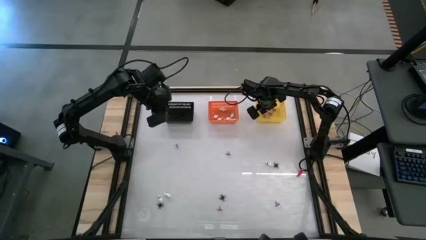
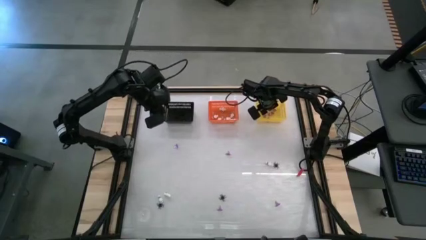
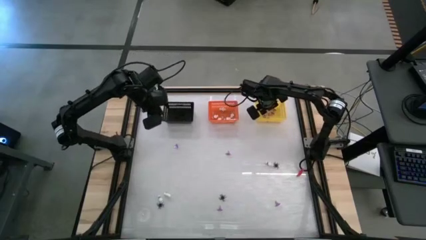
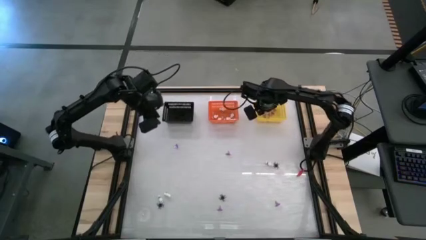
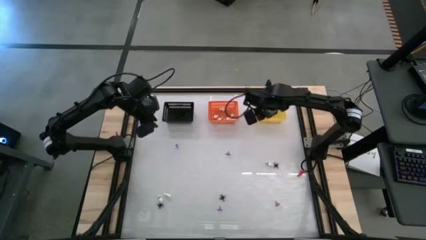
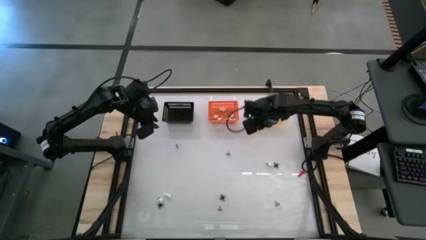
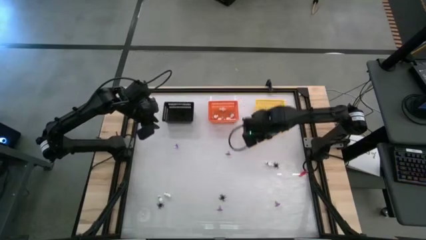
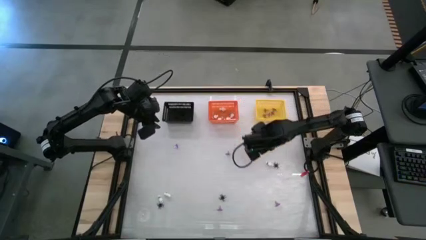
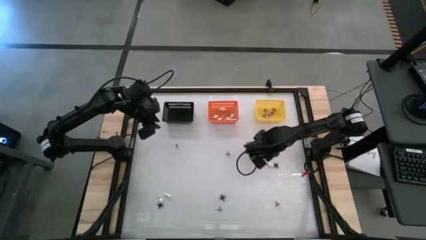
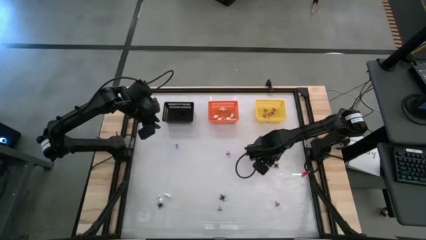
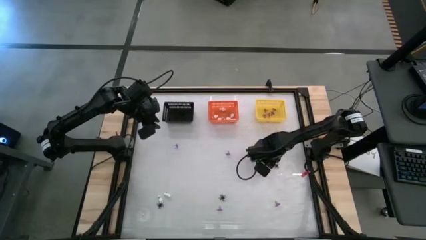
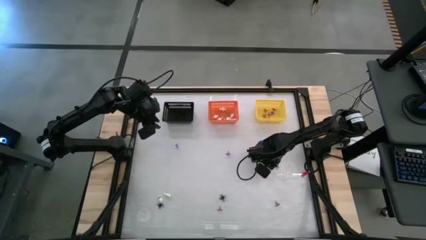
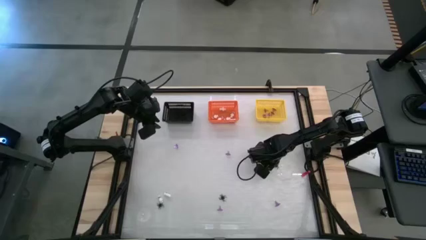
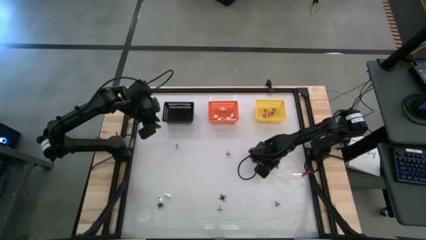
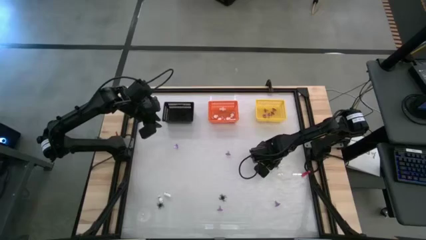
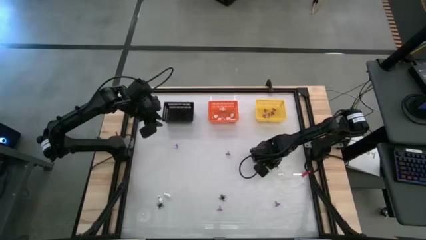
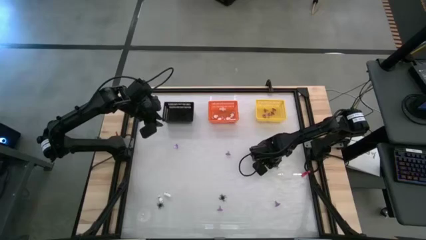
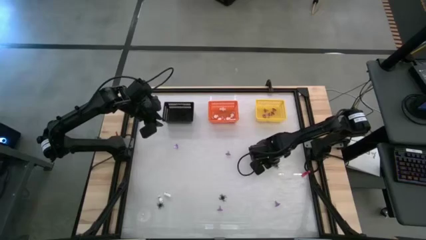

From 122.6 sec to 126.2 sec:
Task: Sort Halloween decoration
Put the skeleton toy into the orange bin

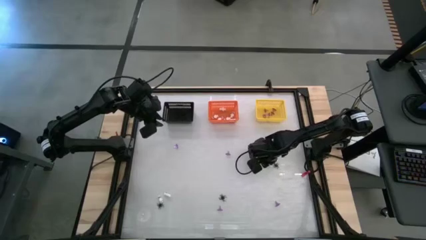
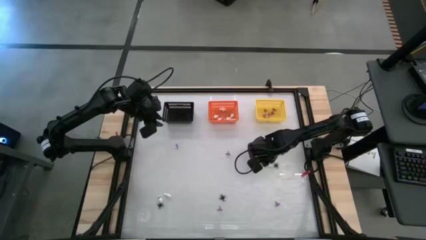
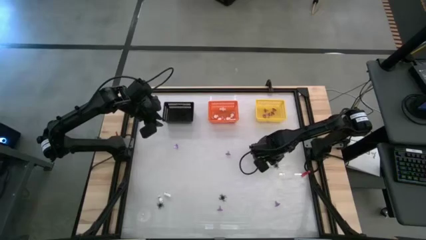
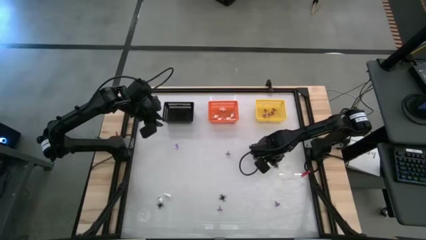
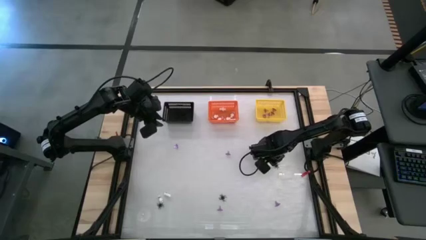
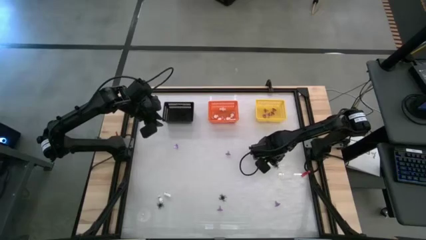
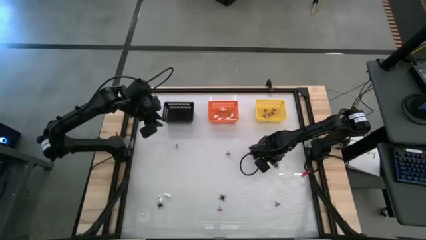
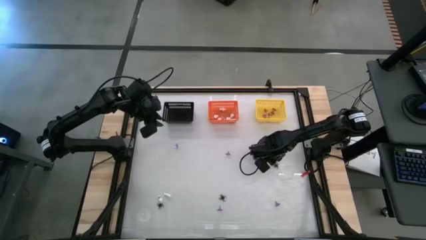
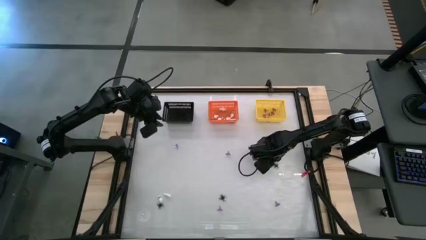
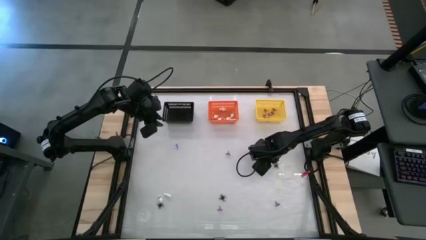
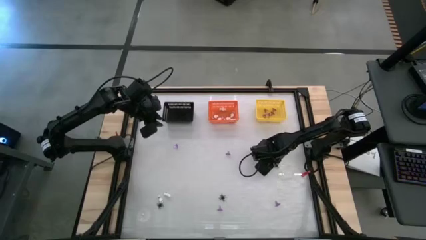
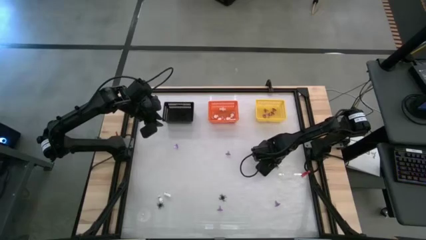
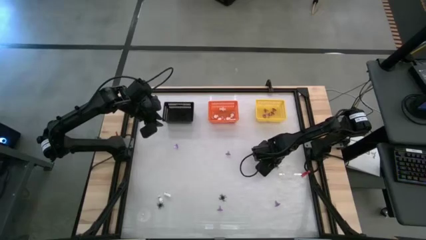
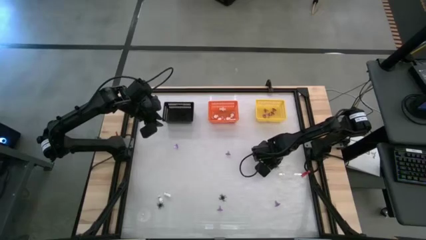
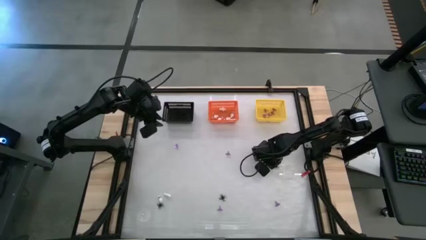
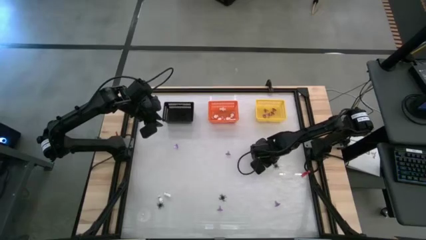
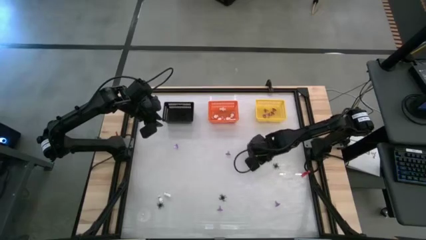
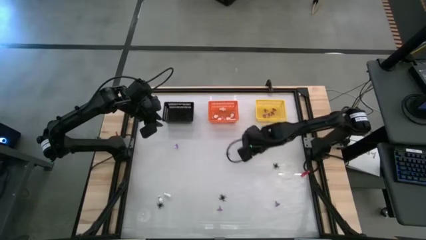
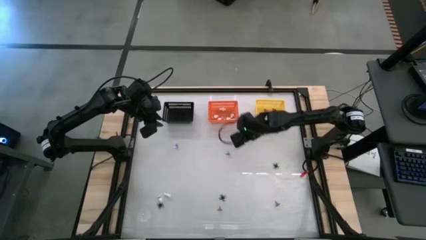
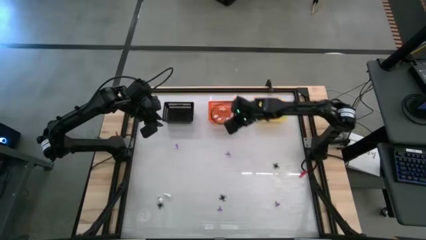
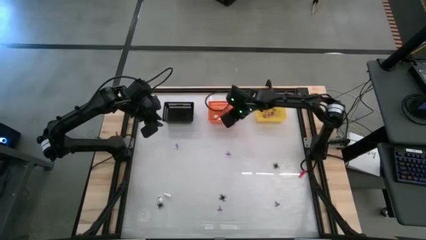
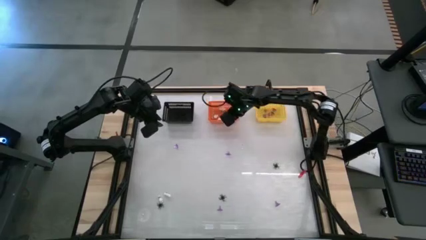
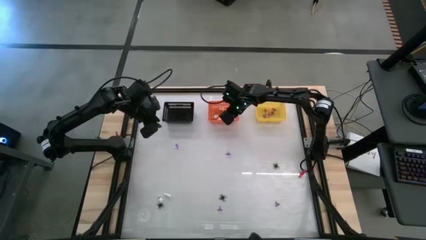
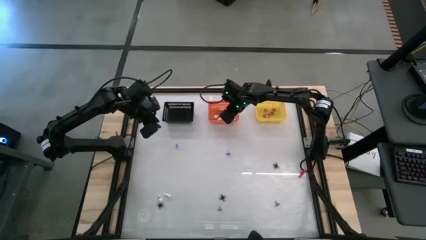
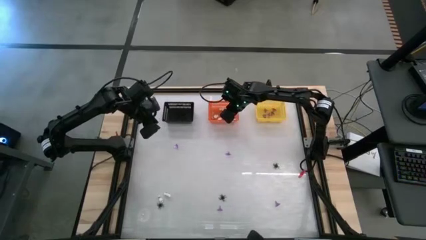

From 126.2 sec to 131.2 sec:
Put the top skeleton toy into the orange bin

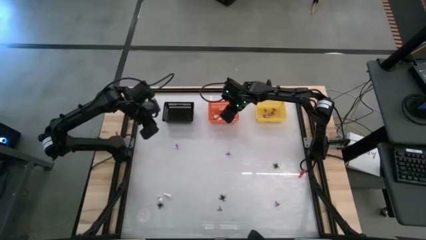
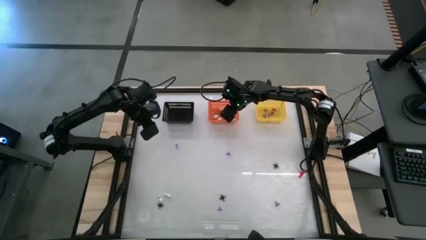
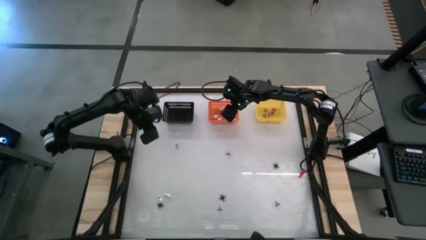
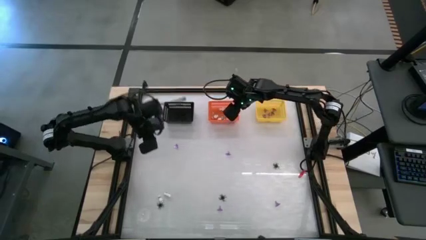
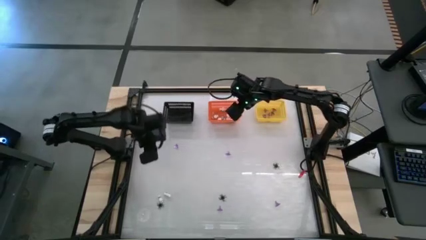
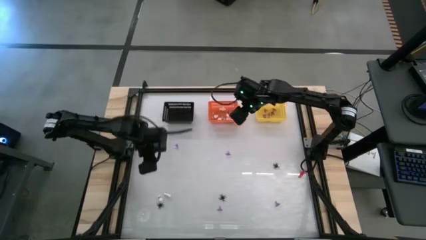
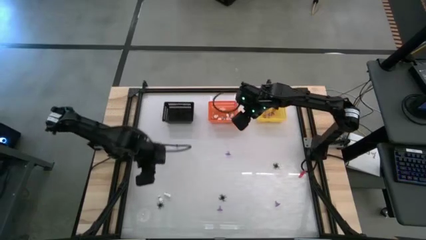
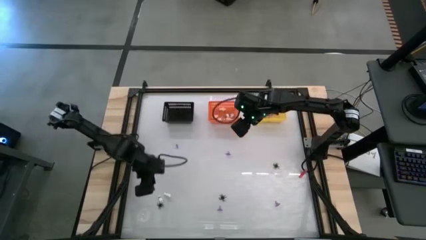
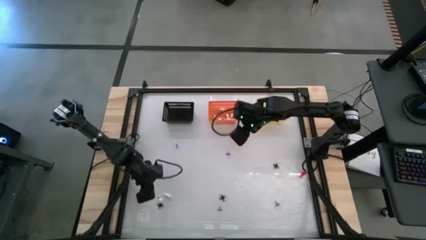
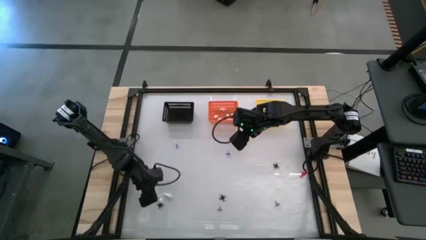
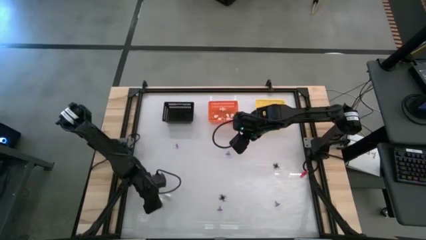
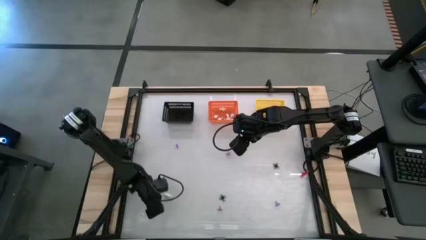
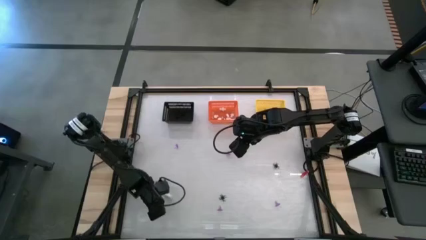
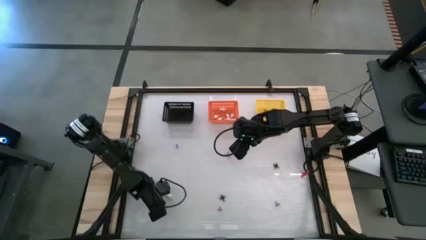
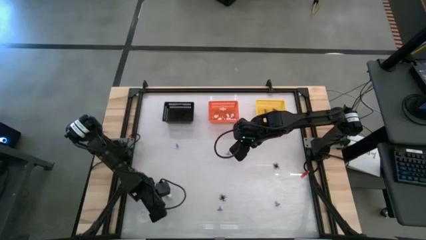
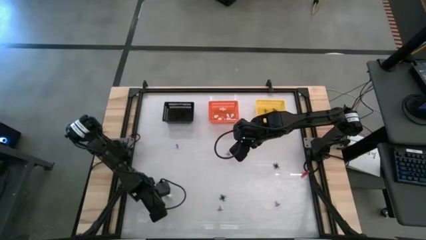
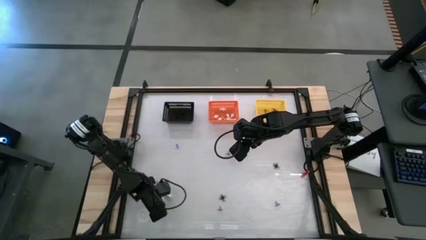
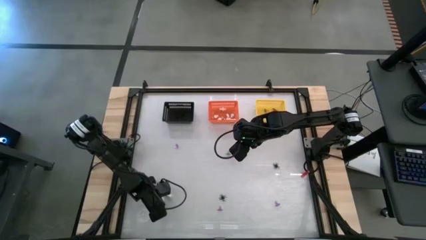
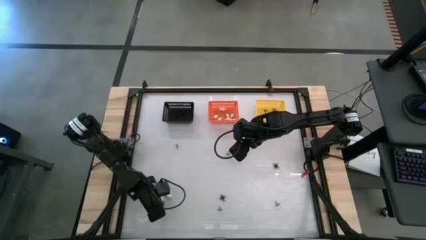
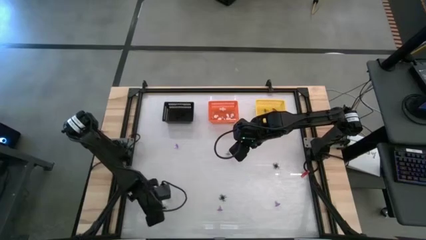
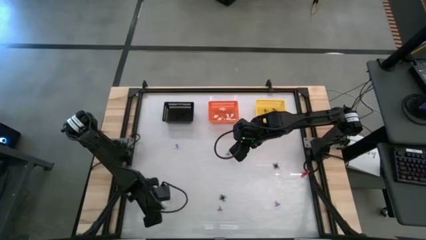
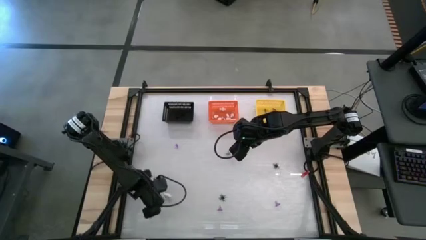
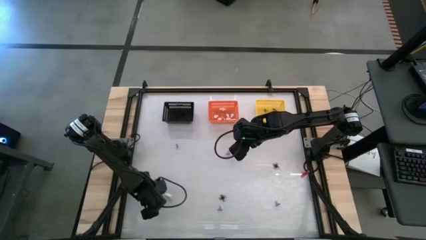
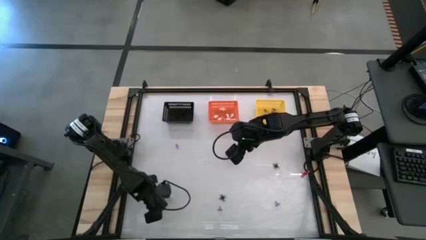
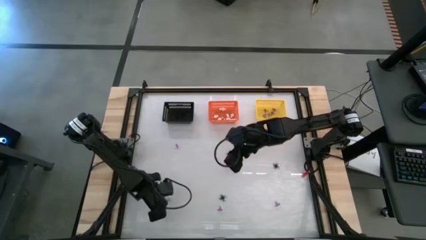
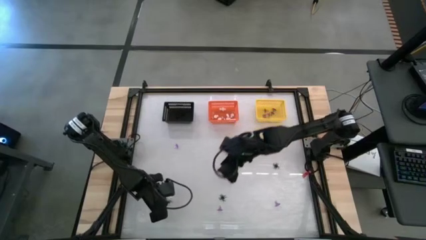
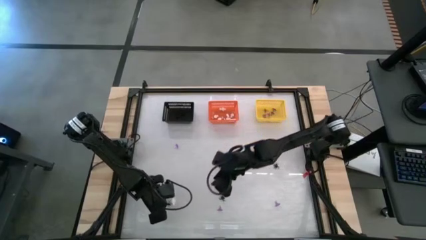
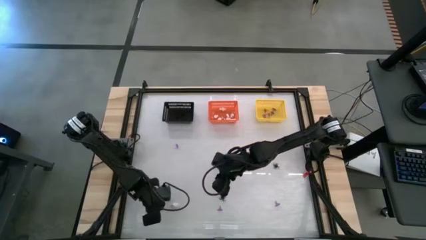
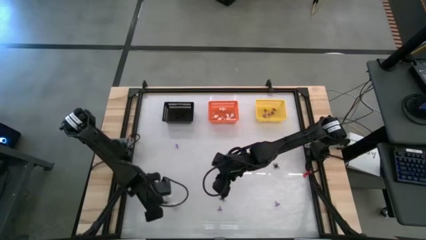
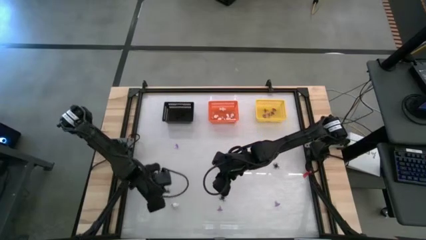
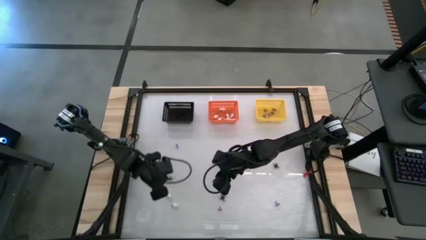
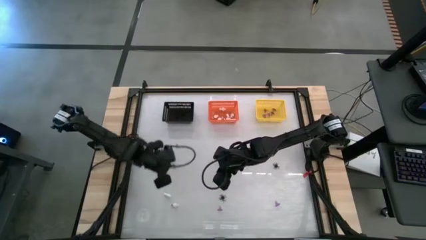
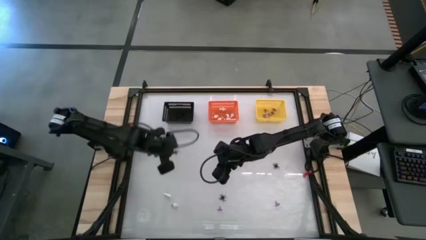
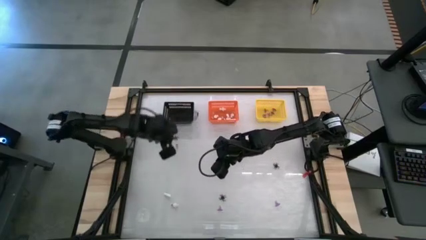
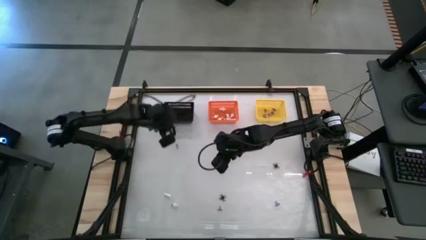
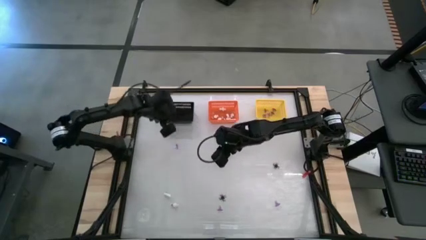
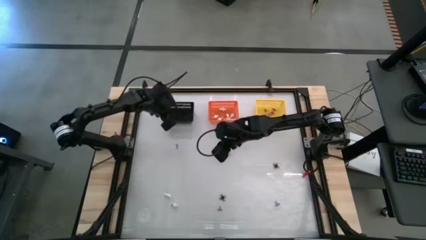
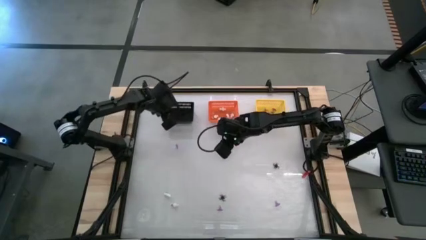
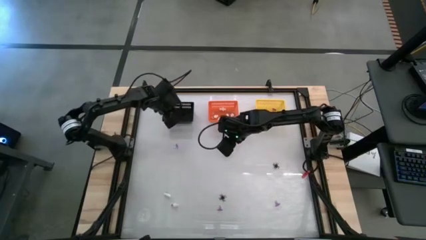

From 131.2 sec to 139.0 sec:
Put the bottom left spider toy into the black bin
